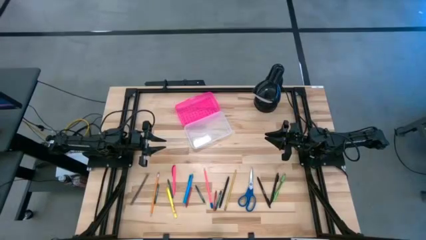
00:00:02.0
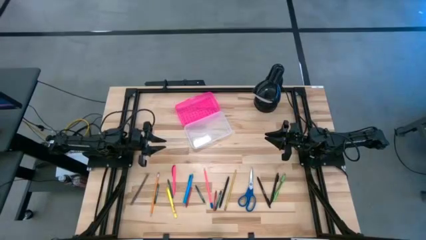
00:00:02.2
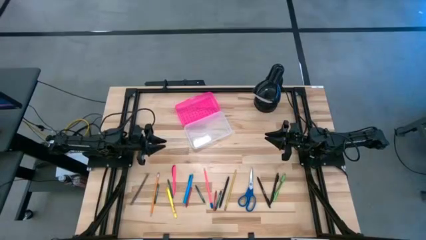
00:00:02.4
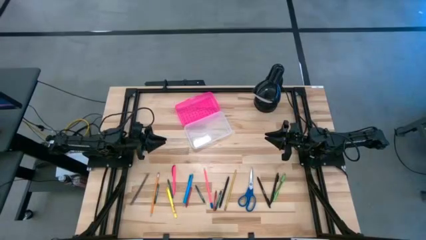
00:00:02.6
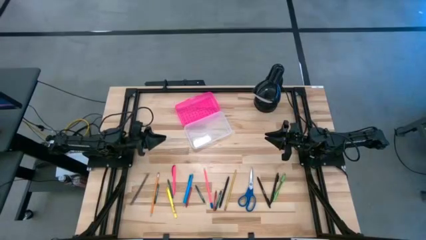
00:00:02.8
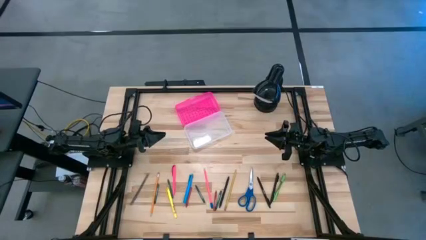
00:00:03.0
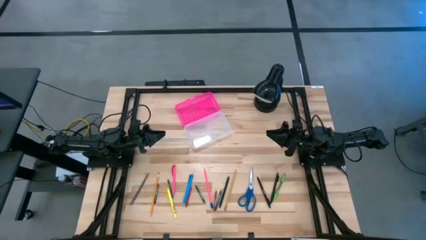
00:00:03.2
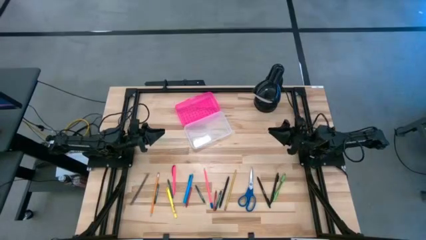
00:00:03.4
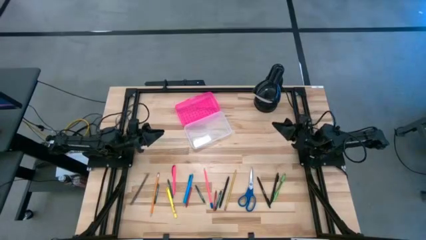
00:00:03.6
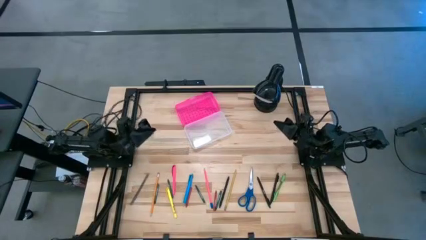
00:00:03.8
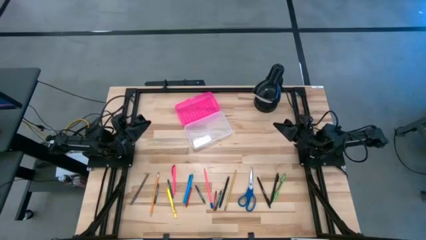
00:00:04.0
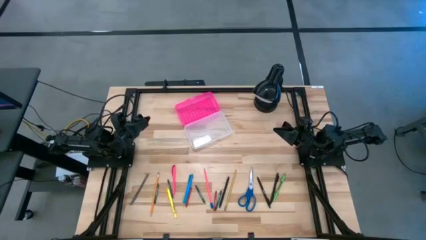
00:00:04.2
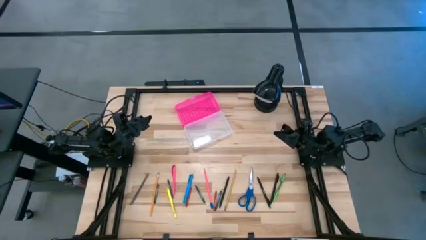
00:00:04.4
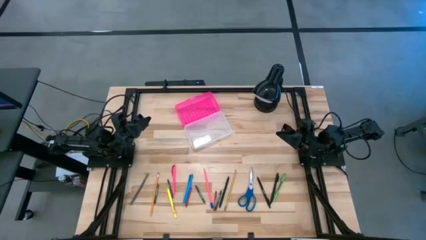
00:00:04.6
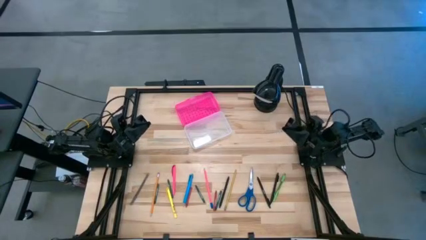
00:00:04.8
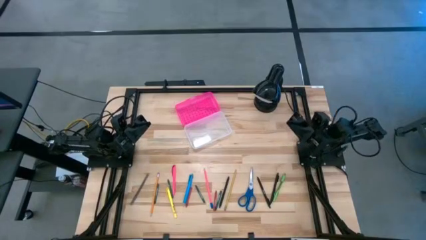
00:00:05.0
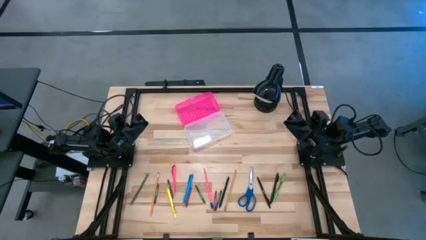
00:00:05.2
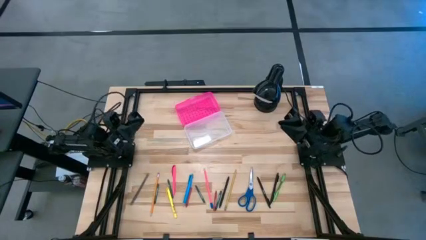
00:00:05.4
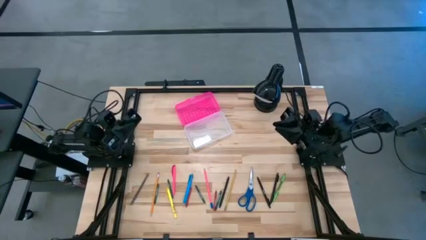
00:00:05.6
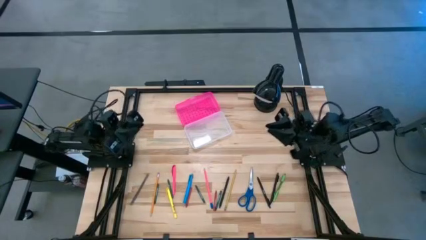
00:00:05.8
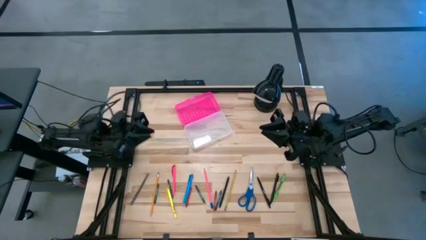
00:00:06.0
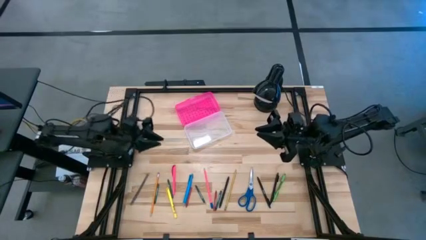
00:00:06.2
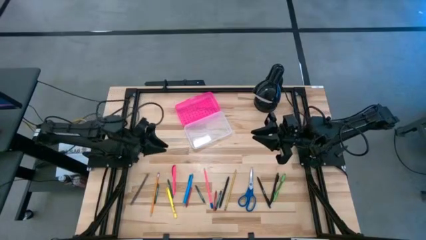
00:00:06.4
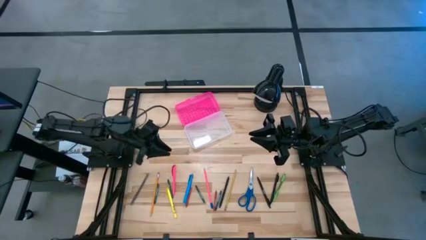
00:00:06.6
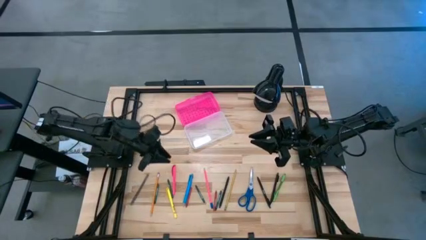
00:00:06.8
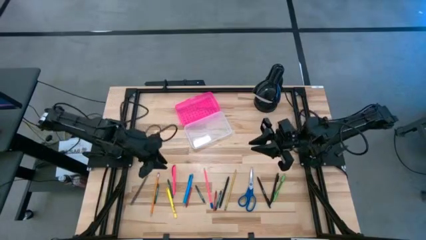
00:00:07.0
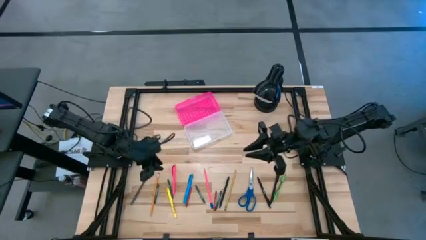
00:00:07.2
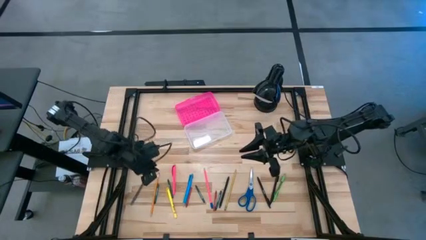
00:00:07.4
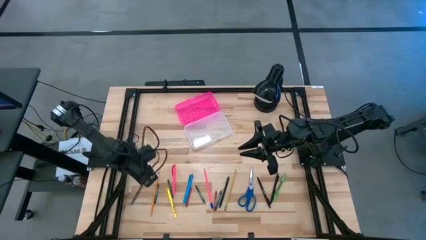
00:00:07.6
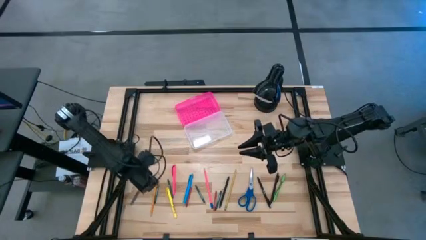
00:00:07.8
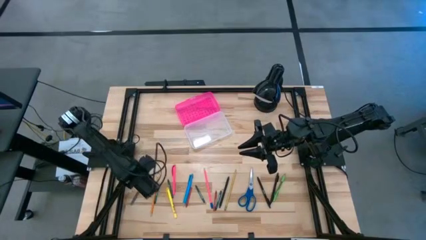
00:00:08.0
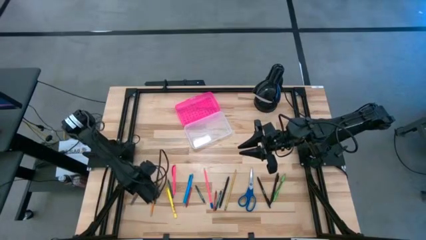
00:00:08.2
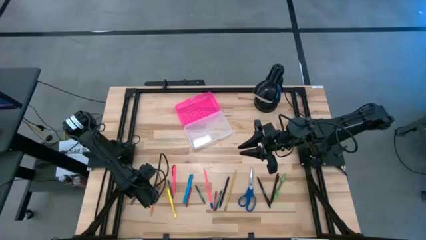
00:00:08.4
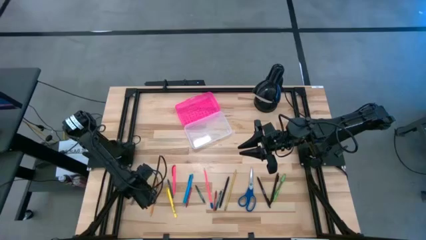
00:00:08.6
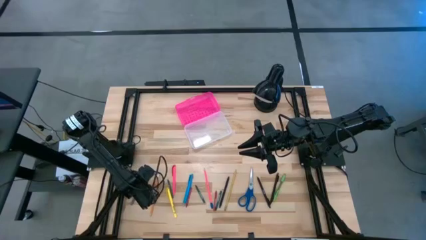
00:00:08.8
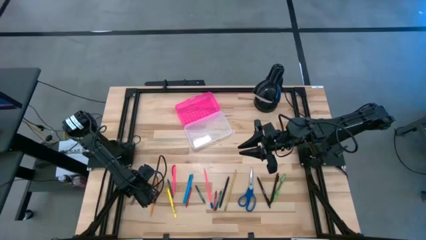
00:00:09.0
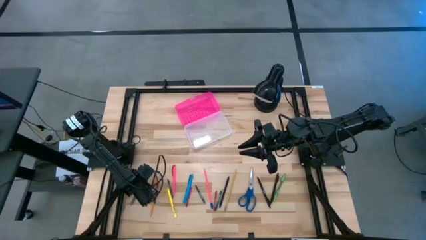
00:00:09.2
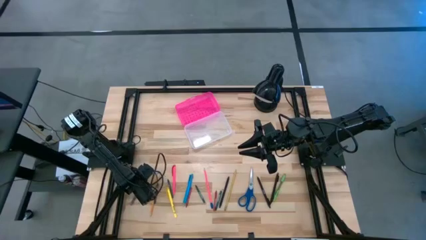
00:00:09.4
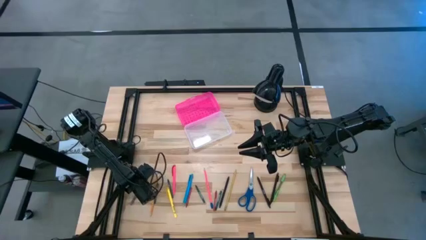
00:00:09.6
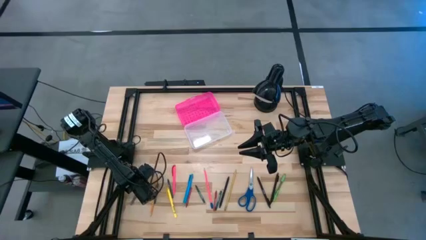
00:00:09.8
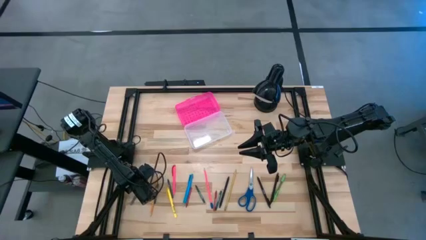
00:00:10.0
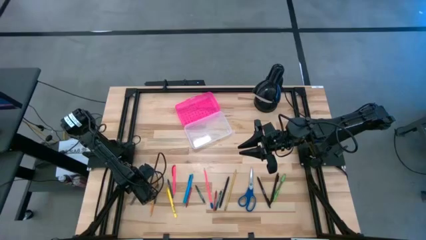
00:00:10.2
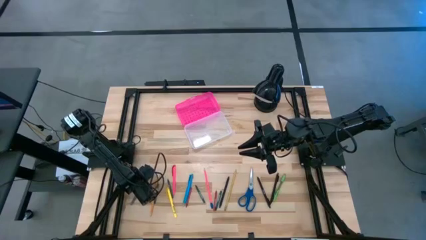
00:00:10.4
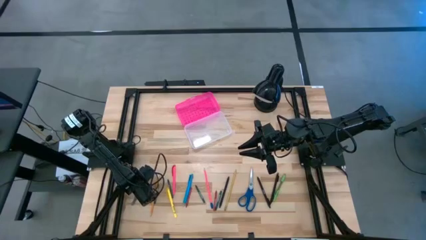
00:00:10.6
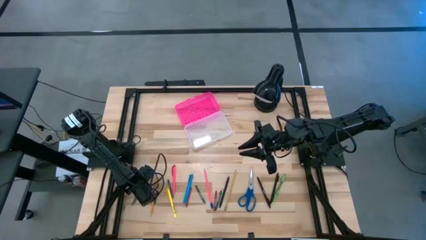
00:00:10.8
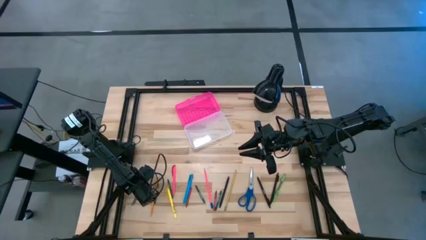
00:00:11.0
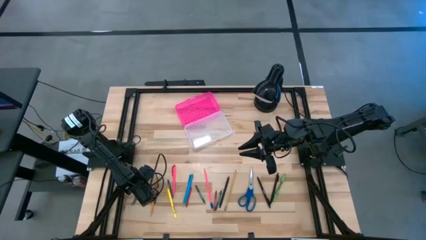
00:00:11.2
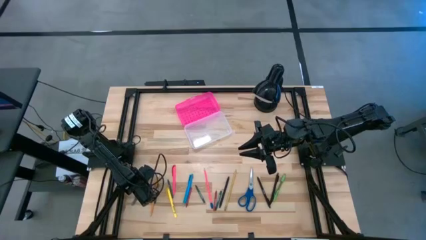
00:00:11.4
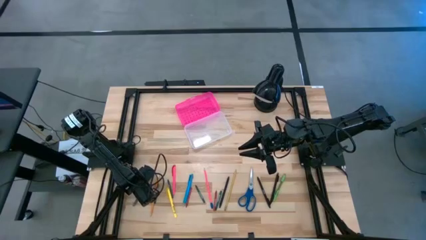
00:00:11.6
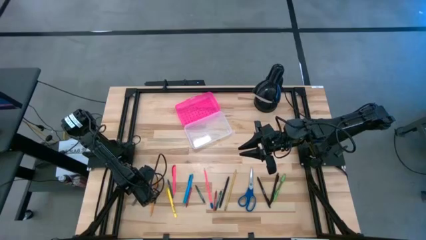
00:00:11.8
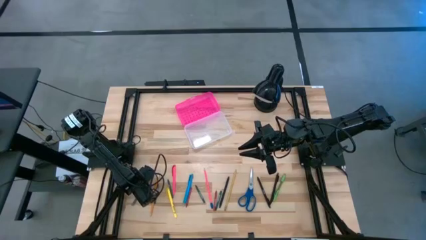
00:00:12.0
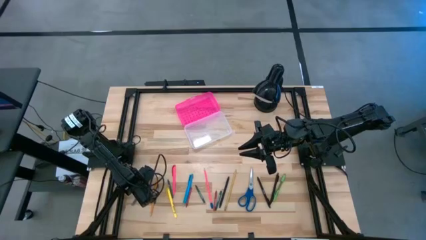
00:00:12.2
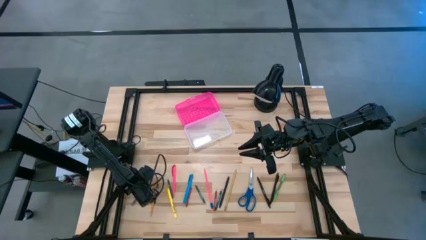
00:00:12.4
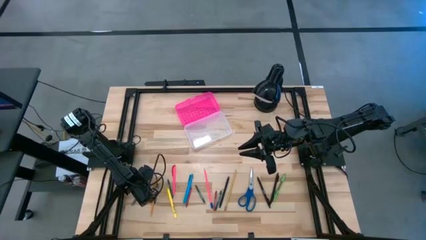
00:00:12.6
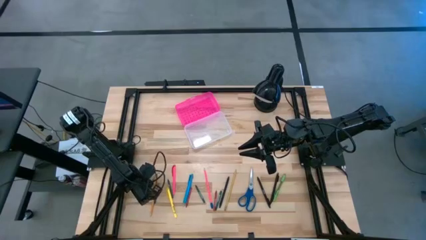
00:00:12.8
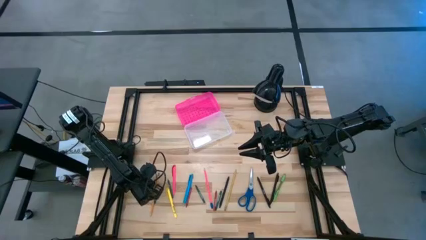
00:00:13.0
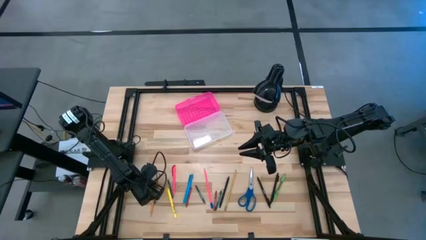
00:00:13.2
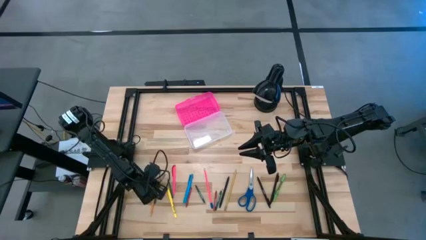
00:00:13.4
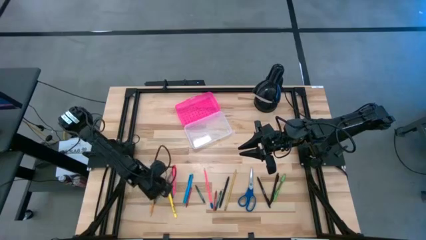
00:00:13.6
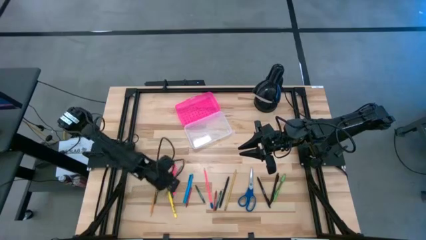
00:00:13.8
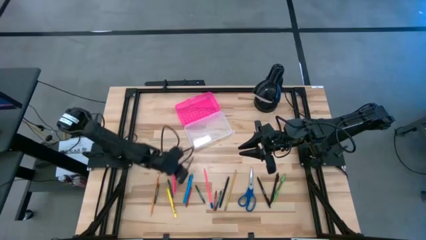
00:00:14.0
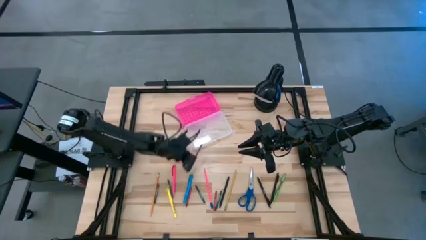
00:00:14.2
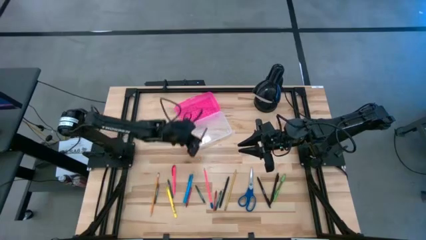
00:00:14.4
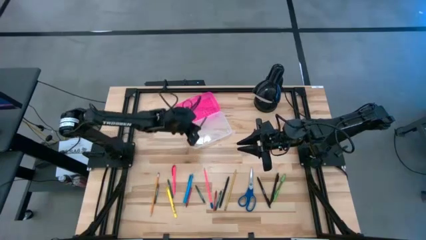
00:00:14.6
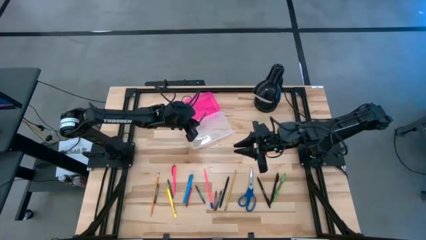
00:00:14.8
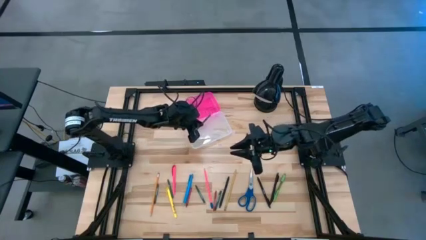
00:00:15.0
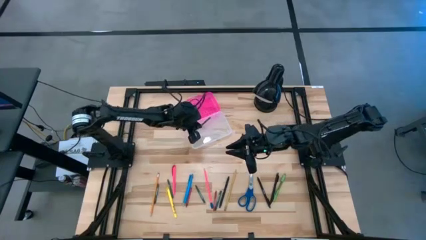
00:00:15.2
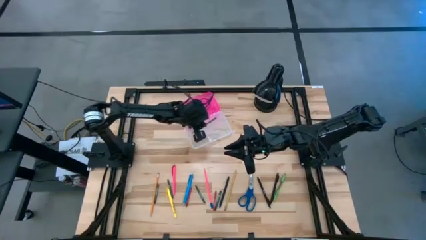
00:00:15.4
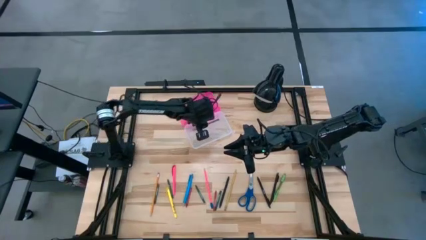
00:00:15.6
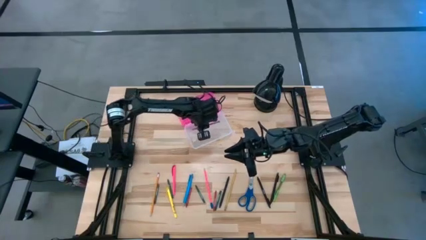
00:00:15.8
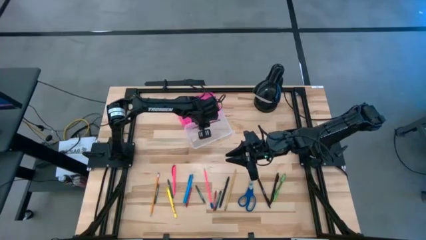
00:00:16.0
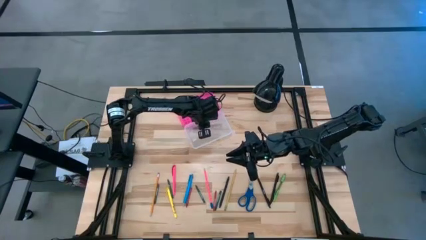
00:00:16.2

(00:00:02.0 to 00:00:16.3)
Task: Pick & place school supplies into a supply box
Put the gray pen into the pink supply box
